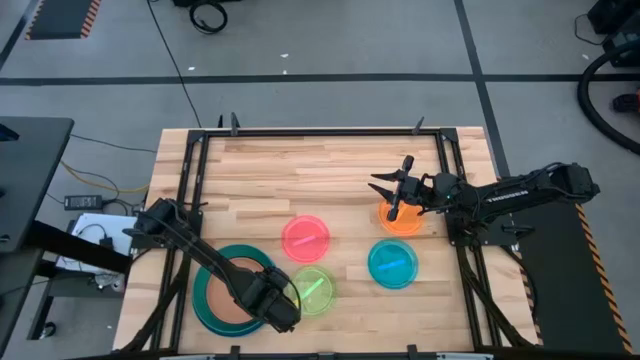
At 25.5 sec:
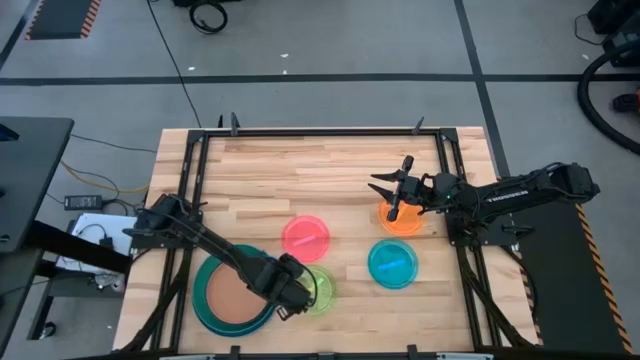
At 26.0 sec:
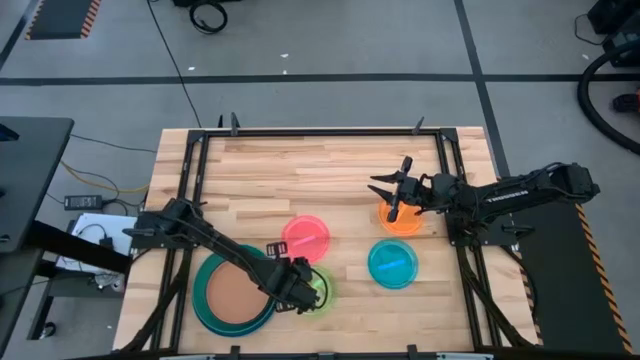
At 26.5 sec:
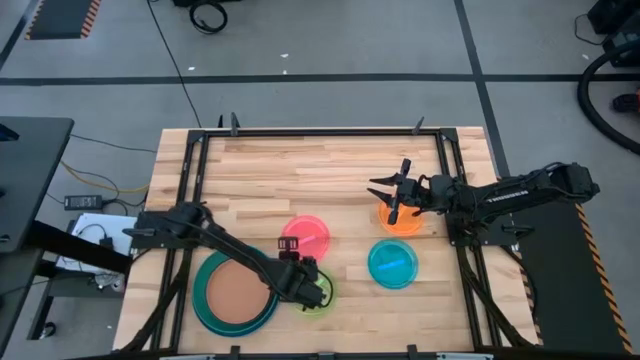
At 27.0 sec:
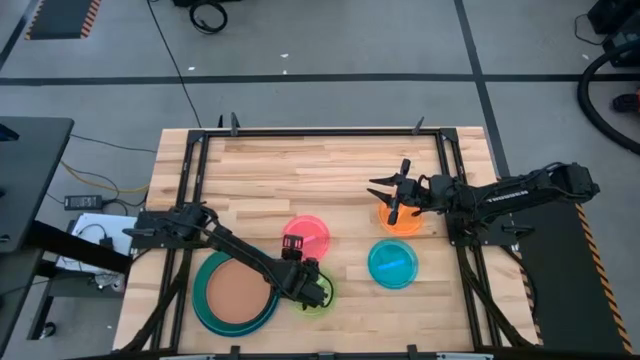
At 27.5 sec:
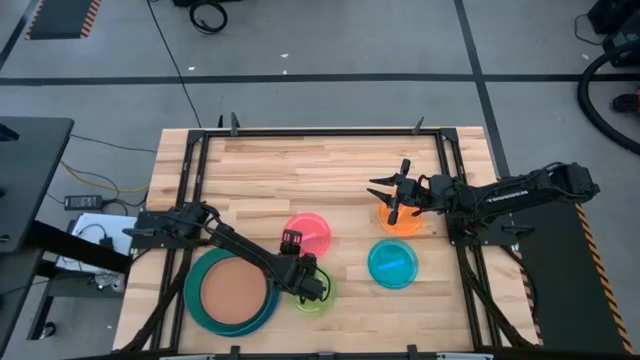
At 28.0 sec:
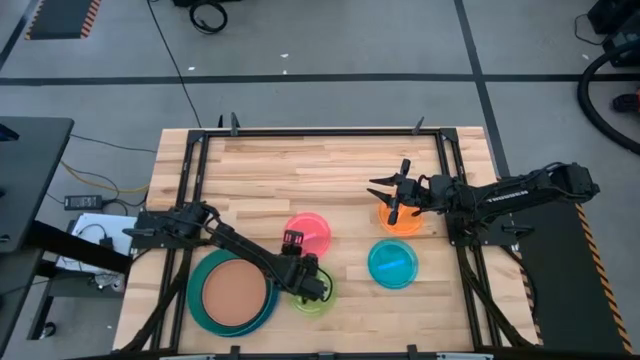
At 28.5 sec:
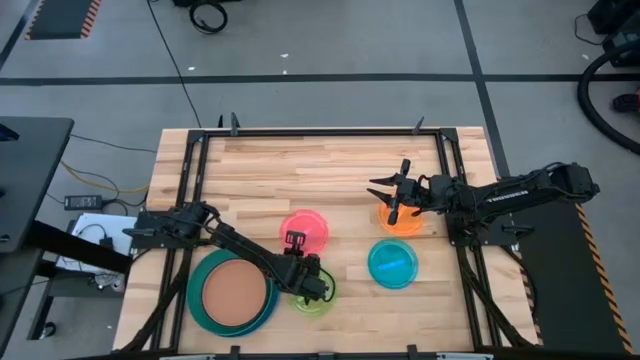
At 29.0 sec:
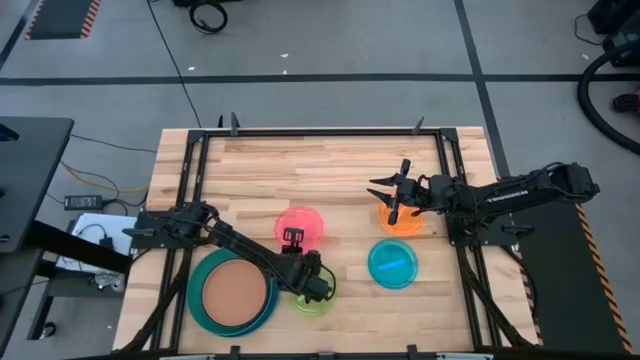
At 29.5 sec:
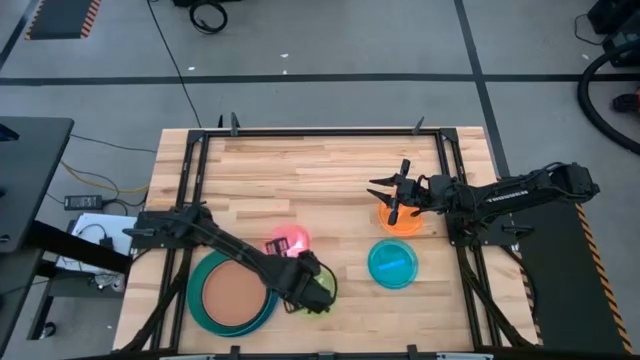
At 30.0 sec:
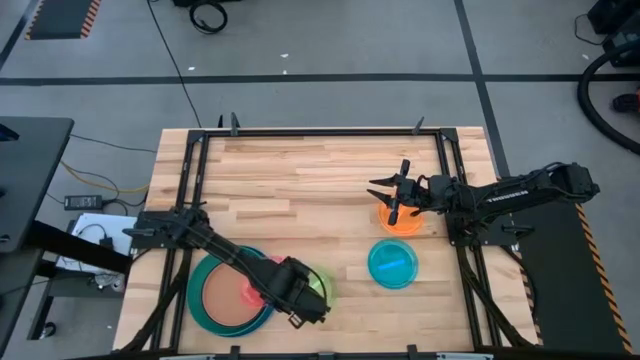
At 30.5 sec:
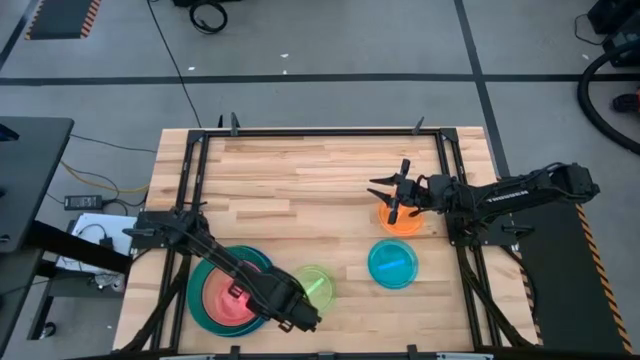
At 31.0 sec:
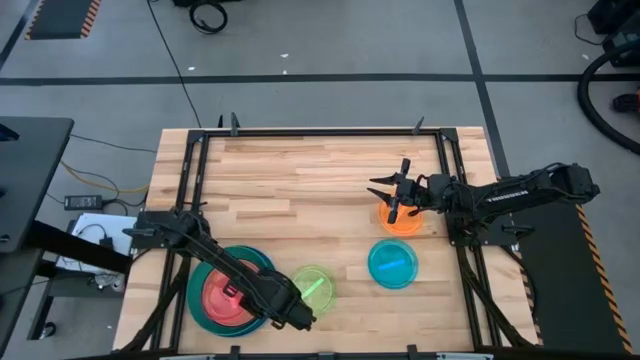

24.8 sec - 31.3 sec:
Task: Stack plastic plates
Stack the pink plate on top of the brown plate

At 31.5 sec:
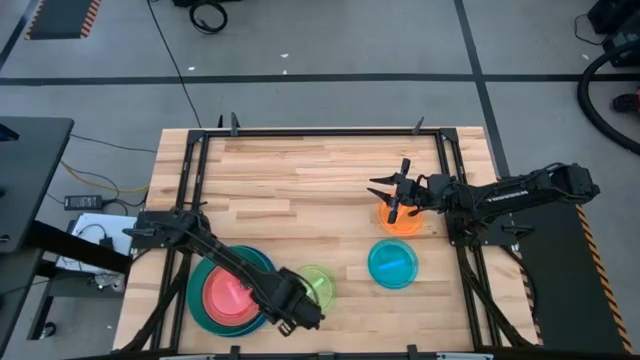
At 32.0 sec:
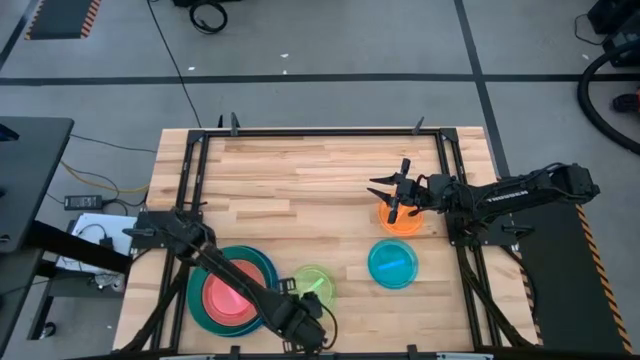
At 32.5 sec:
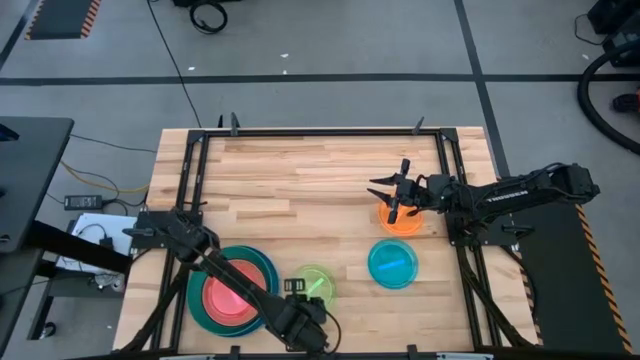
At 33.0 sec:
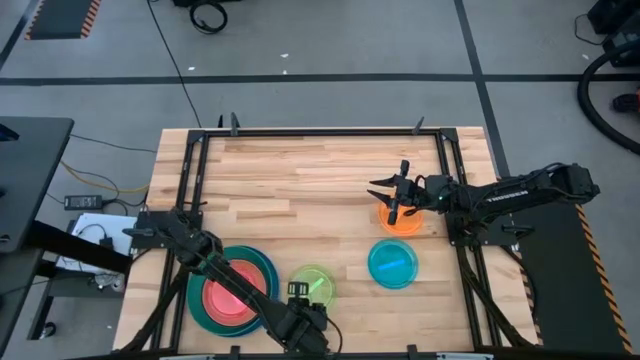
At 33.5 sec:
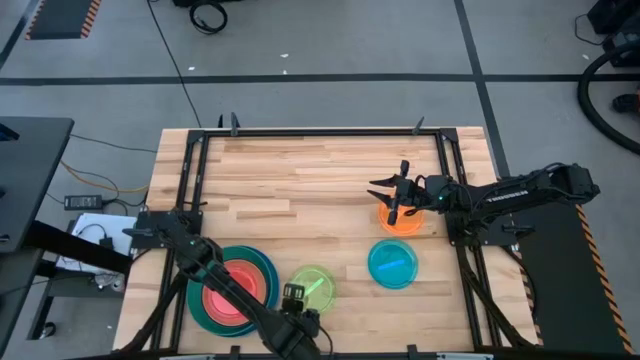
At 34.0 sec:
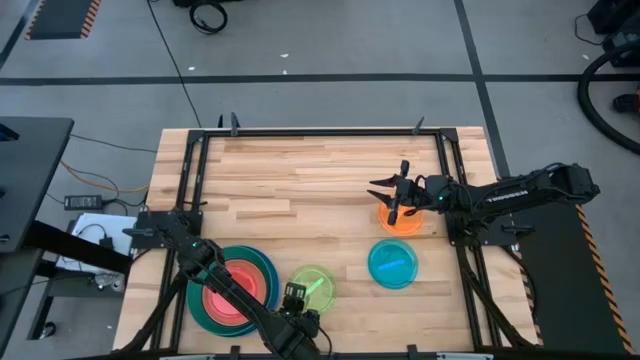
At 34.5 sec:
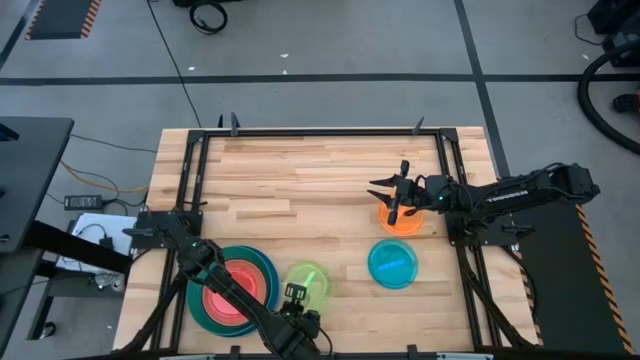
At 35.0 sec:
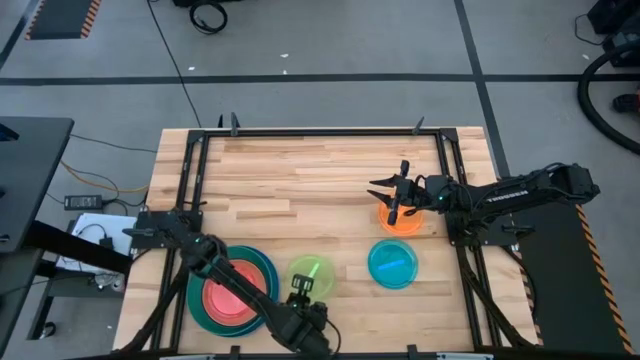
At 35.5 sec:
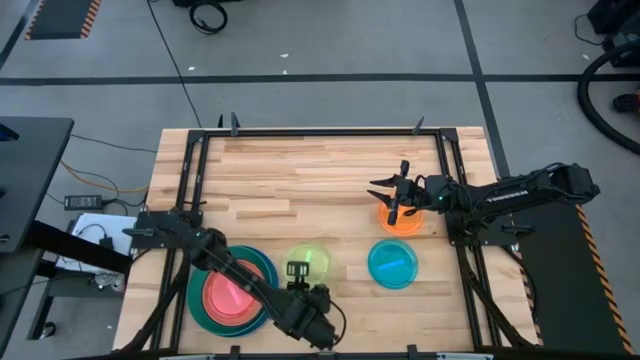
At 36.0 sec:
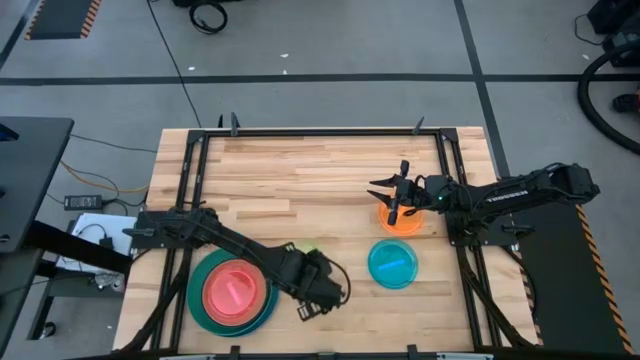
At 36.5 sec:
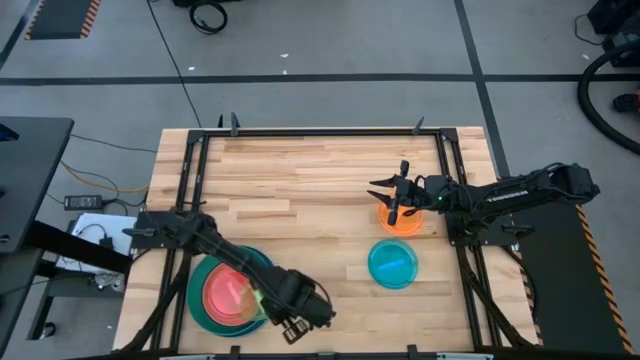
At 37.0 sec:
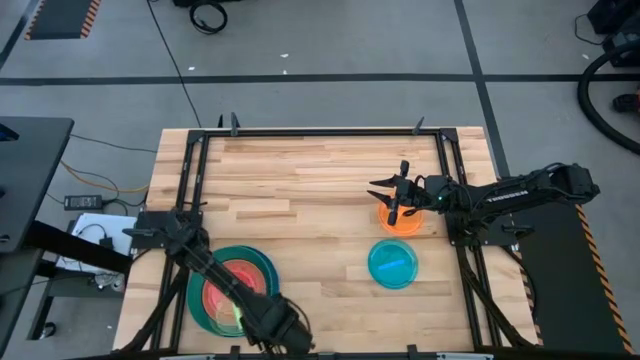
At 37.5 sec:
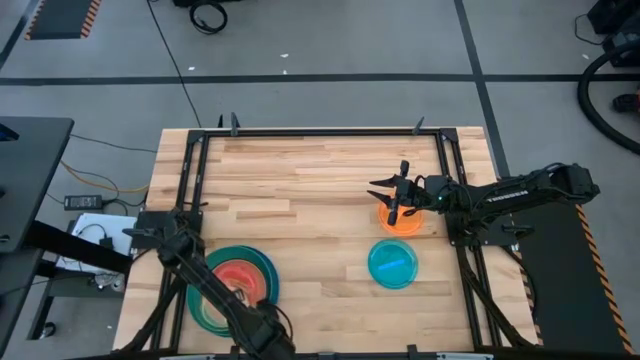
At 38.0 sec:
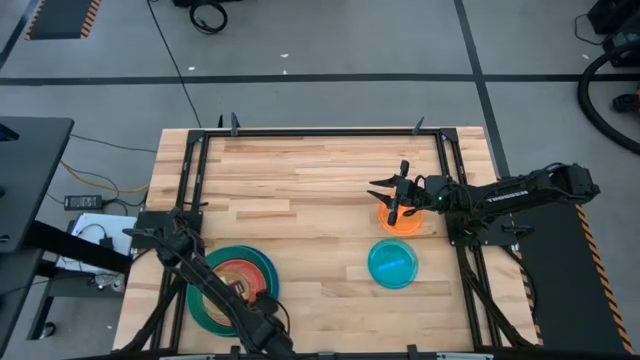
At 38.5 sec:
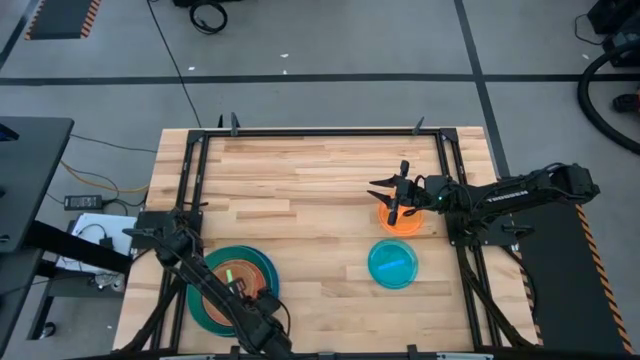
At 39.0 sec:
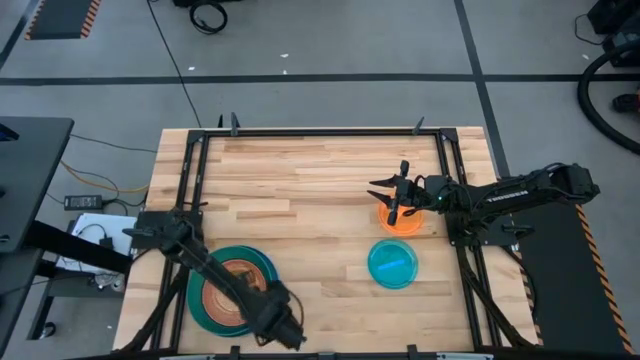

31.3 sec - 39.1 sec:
Stack the light green plate on top of the pink plate

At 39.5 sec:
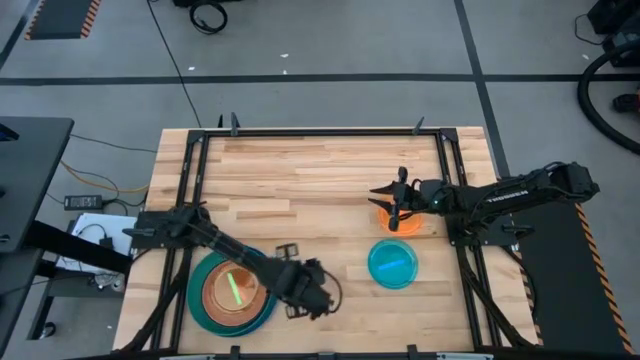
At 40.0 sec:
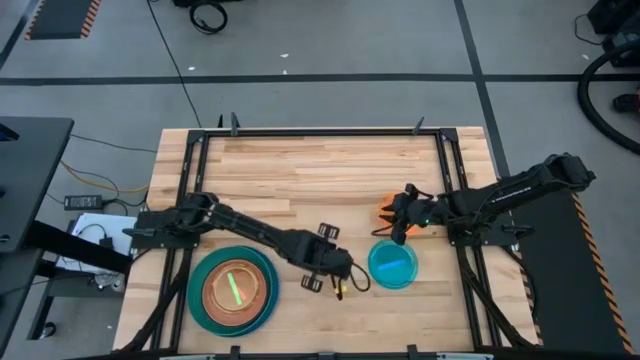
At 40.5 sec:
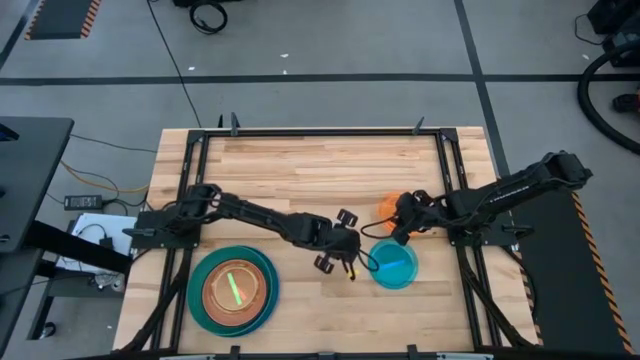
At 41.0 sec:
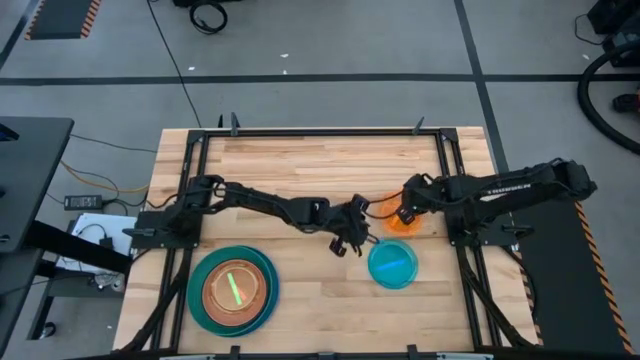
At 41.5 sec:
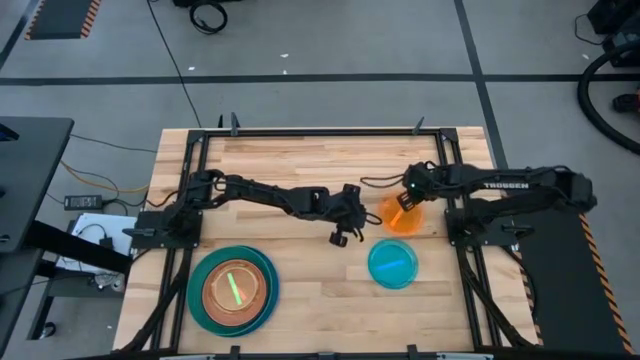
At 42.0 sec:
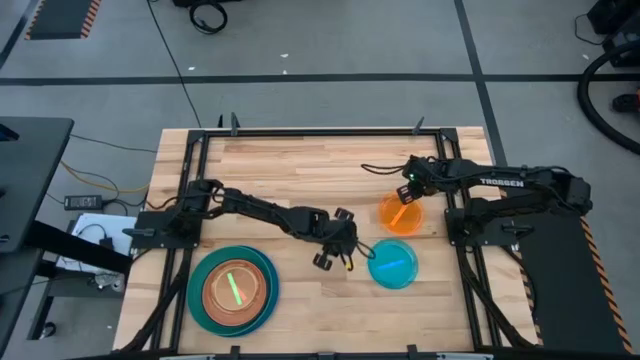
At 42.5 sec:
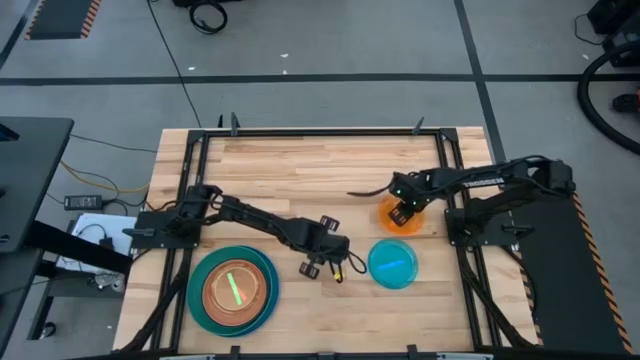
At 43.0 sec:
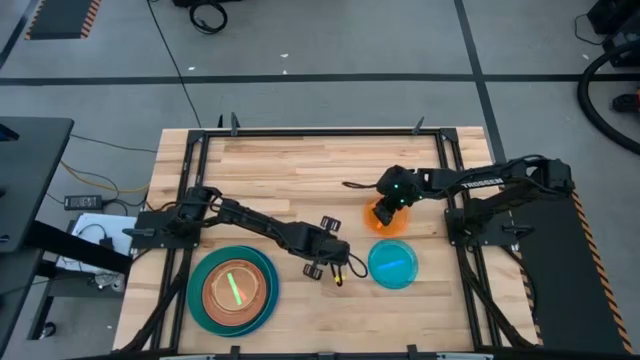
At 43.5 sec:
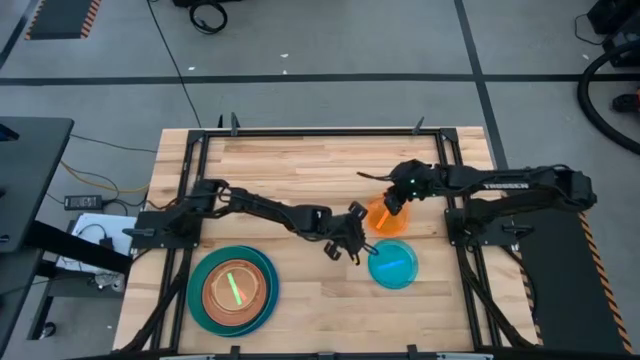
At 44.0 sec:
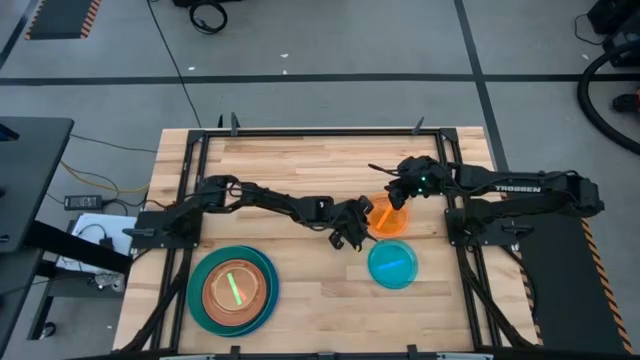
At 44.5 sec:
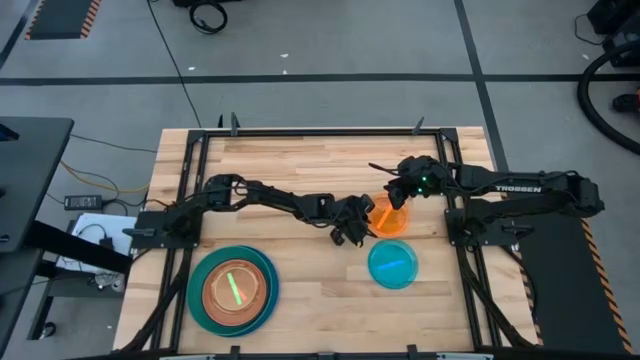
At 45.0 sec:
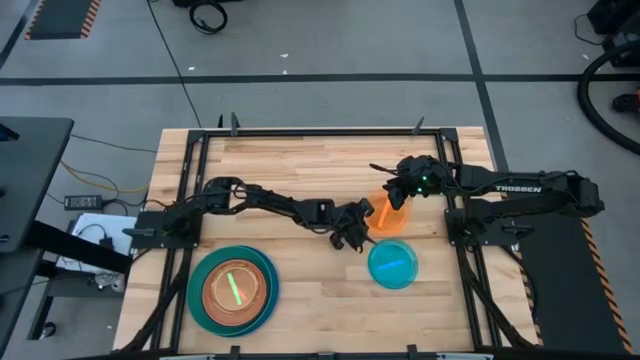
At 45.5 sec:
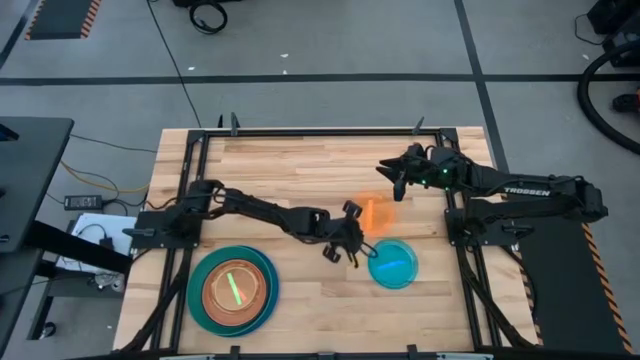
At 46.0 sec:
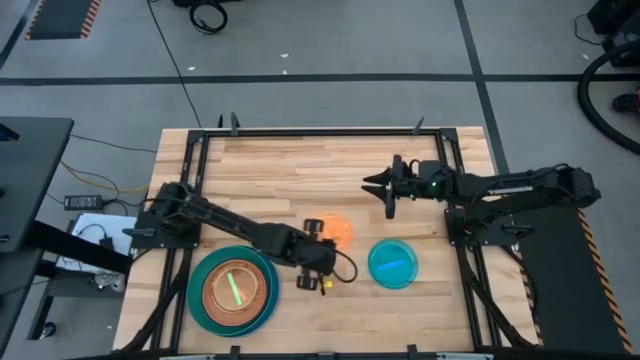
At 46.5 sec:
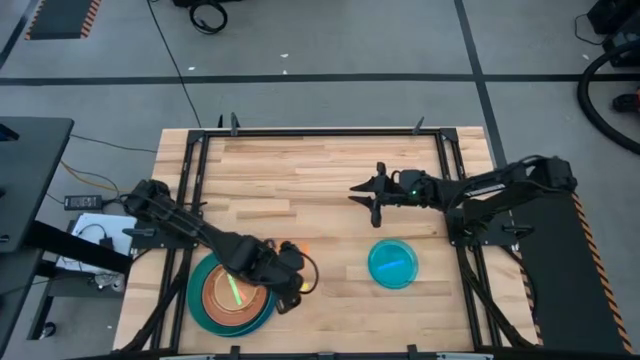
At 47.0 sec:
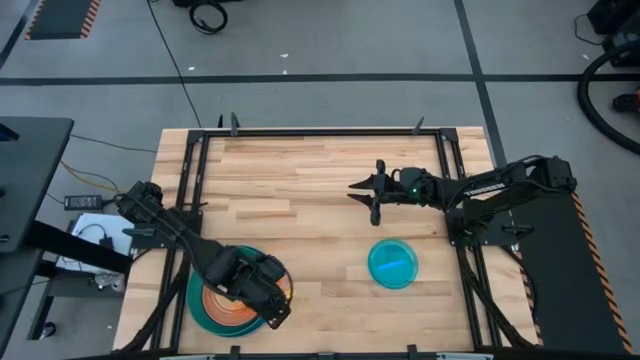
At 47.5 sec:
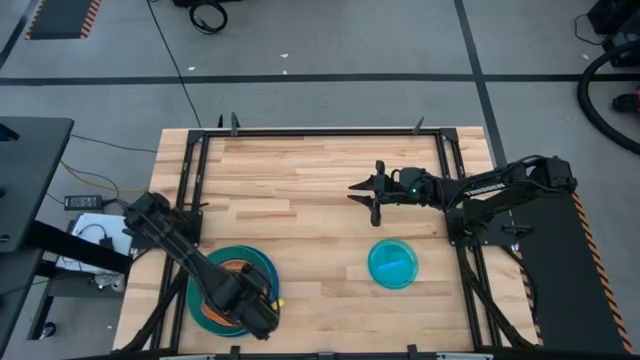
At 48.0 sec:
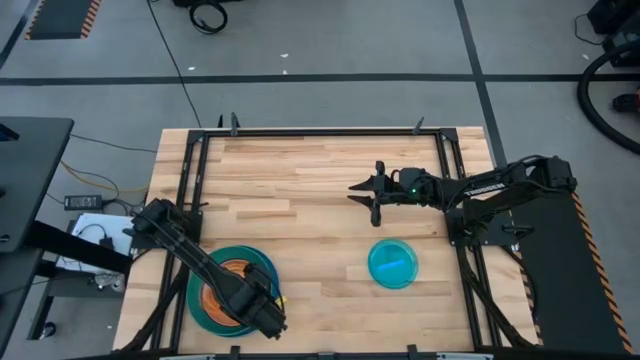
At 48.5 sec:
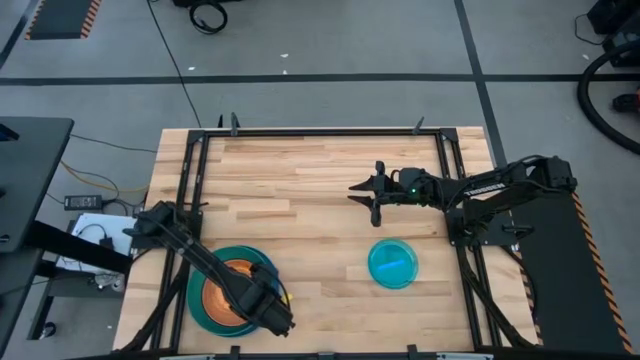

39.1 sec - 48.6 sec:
Stack the orange plate on top of the light green plate
